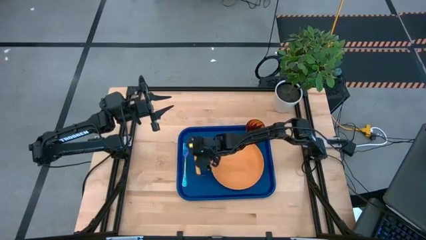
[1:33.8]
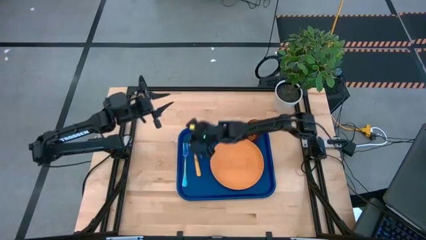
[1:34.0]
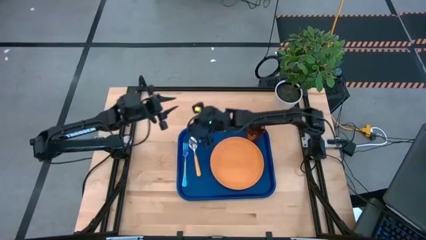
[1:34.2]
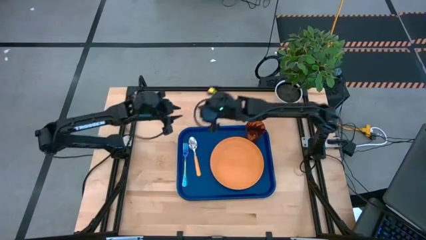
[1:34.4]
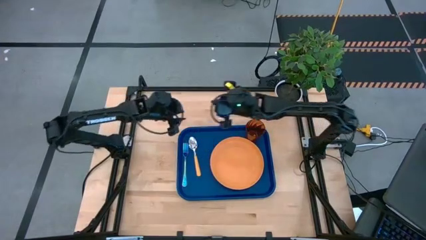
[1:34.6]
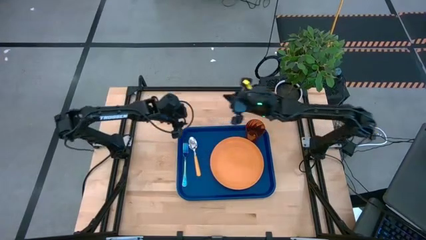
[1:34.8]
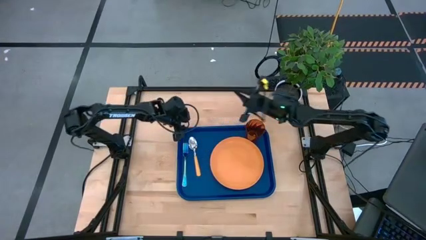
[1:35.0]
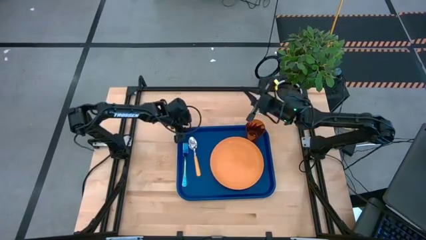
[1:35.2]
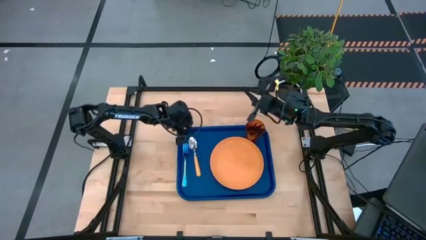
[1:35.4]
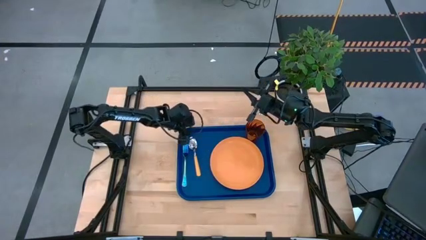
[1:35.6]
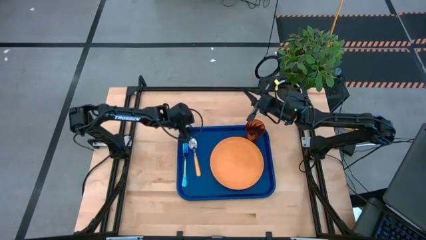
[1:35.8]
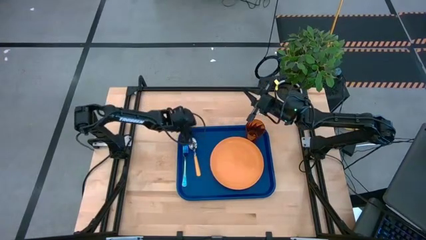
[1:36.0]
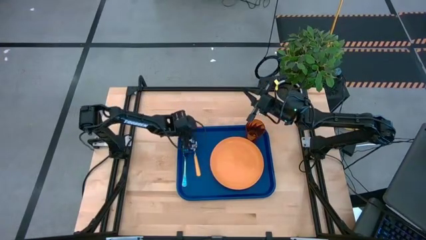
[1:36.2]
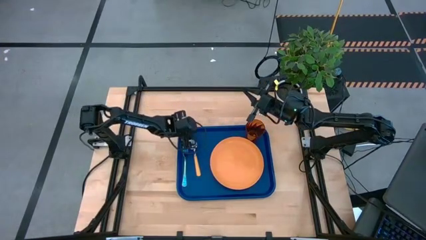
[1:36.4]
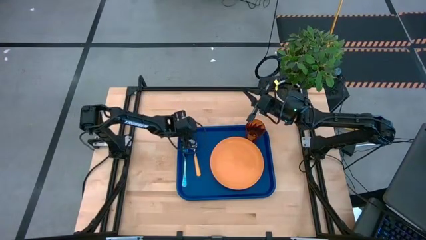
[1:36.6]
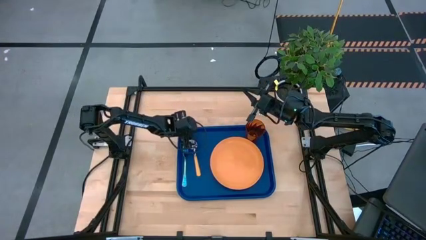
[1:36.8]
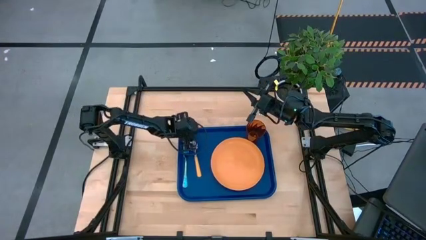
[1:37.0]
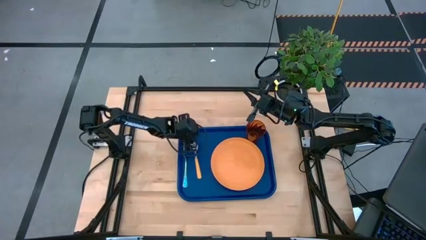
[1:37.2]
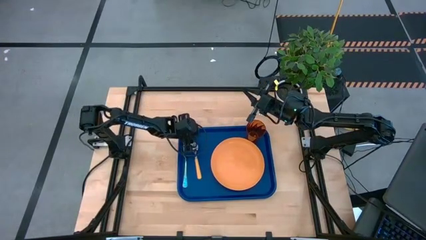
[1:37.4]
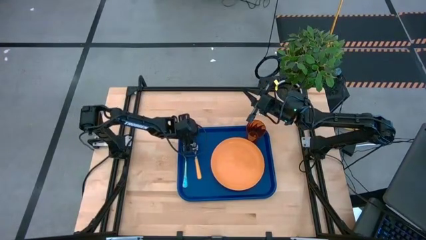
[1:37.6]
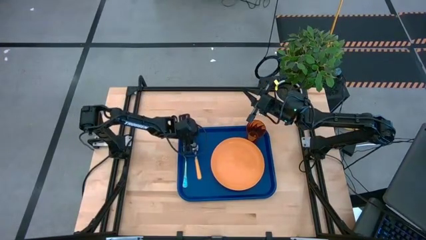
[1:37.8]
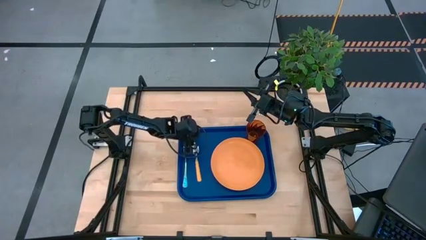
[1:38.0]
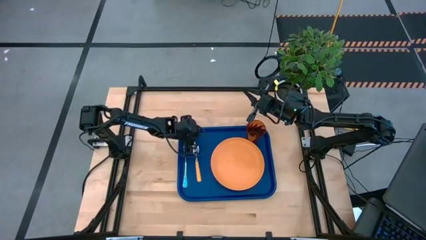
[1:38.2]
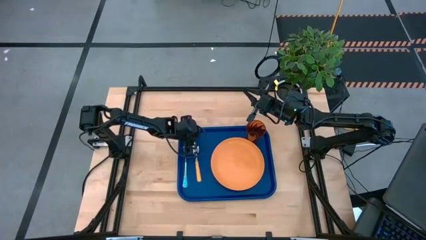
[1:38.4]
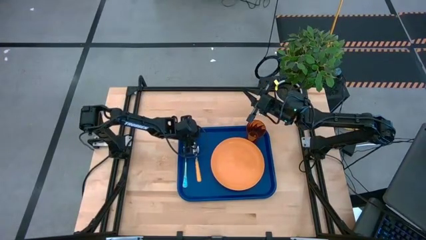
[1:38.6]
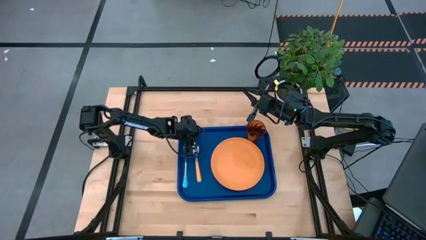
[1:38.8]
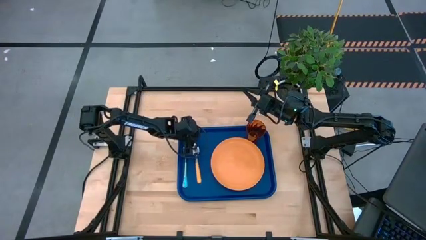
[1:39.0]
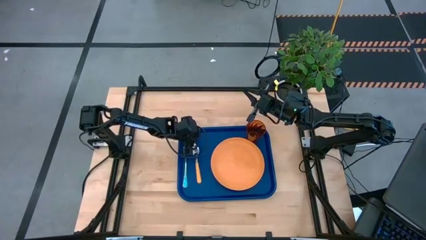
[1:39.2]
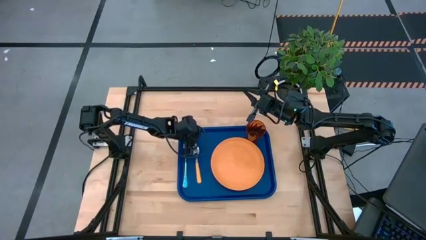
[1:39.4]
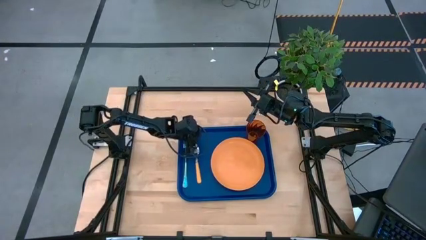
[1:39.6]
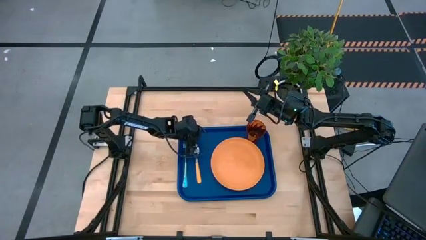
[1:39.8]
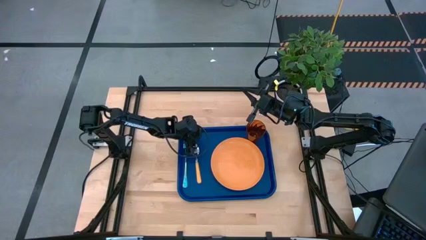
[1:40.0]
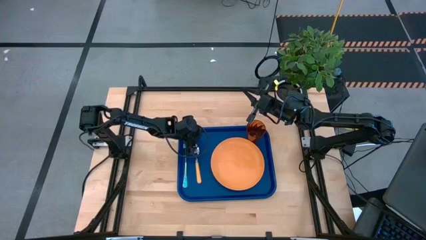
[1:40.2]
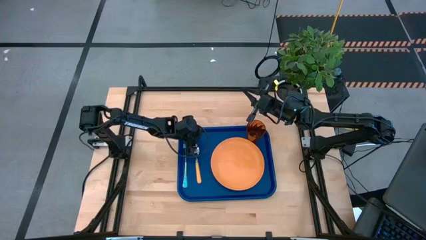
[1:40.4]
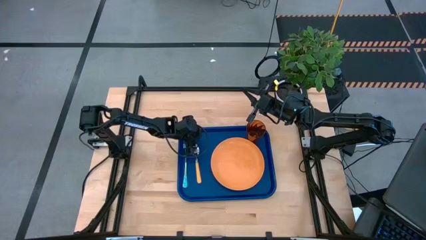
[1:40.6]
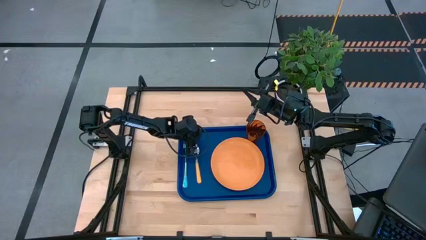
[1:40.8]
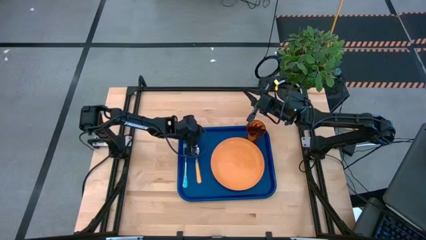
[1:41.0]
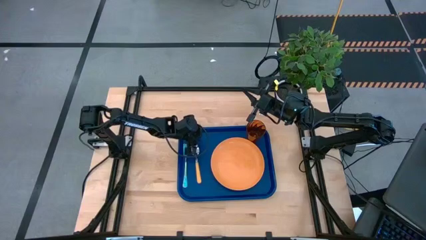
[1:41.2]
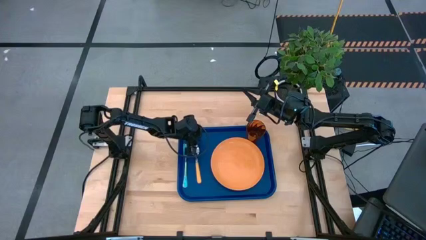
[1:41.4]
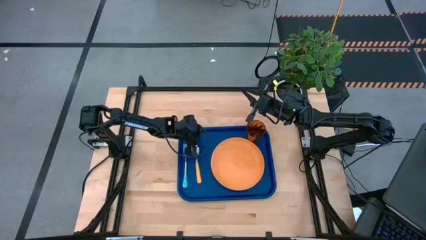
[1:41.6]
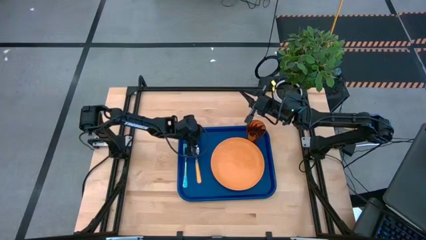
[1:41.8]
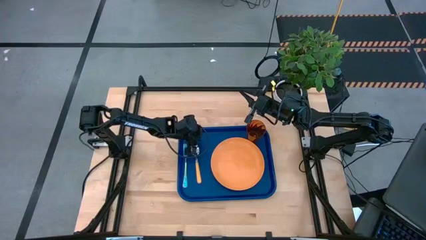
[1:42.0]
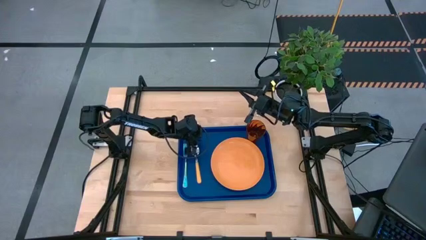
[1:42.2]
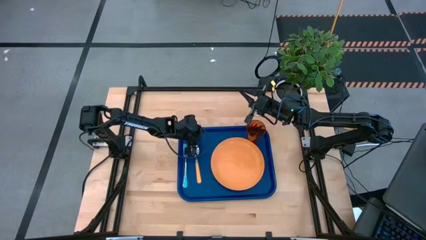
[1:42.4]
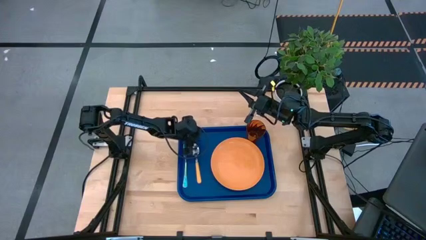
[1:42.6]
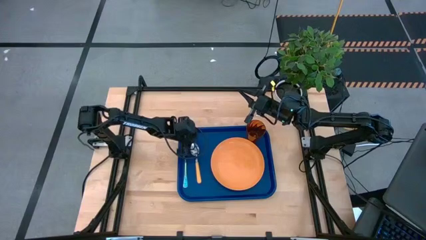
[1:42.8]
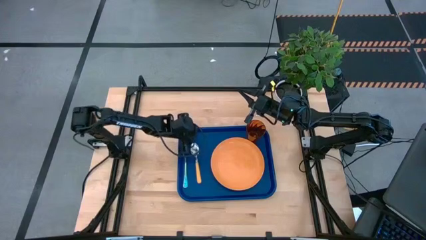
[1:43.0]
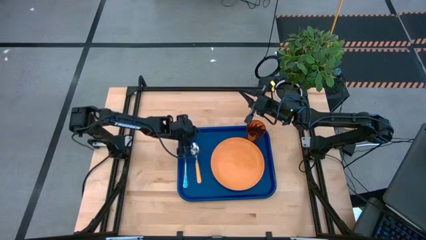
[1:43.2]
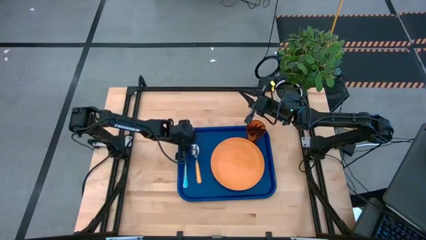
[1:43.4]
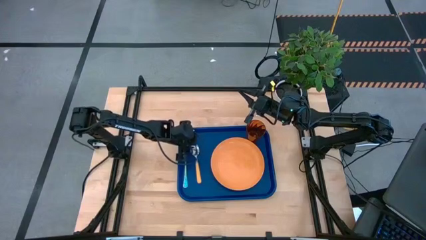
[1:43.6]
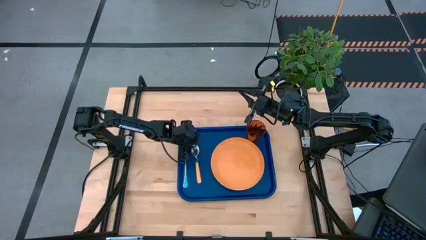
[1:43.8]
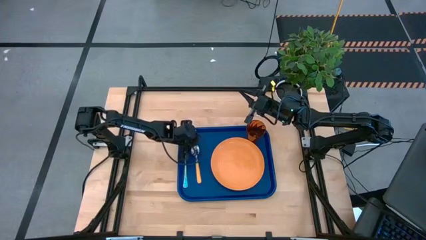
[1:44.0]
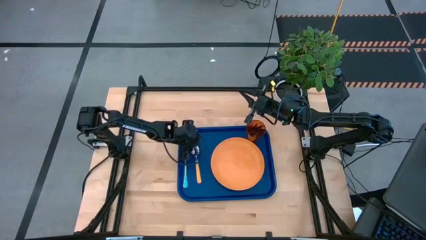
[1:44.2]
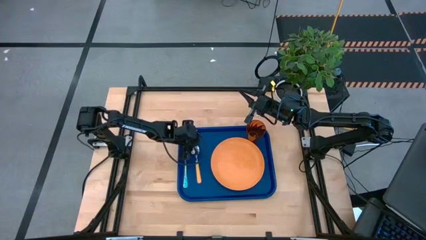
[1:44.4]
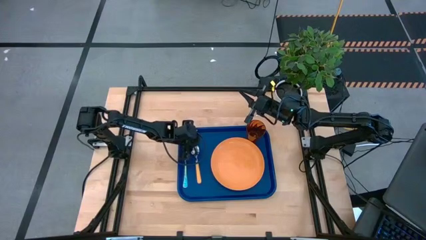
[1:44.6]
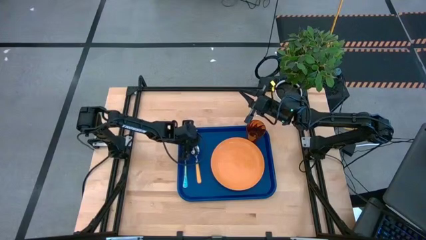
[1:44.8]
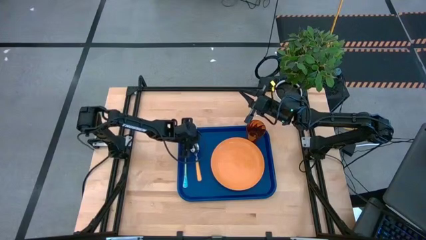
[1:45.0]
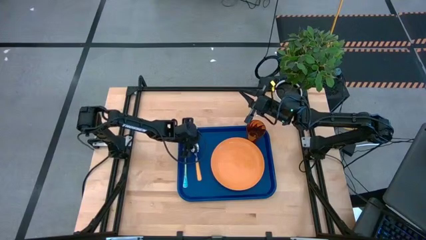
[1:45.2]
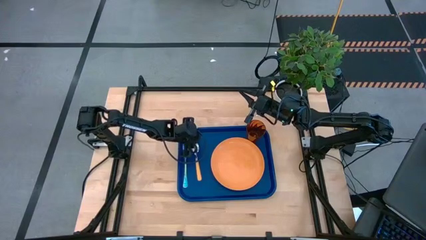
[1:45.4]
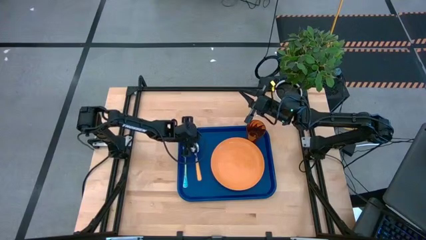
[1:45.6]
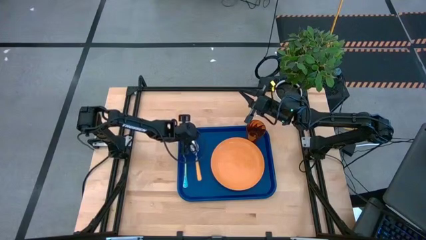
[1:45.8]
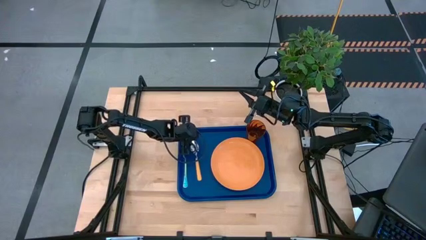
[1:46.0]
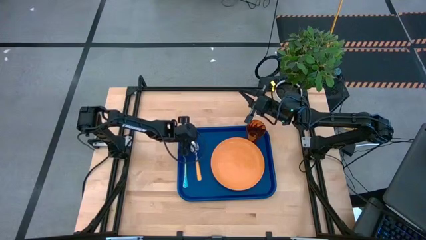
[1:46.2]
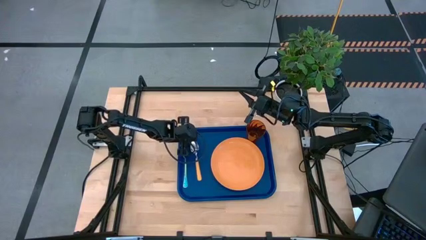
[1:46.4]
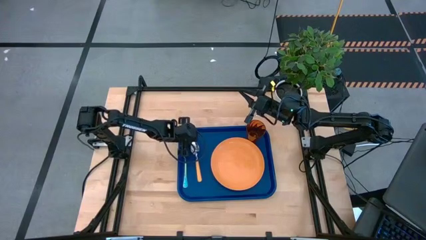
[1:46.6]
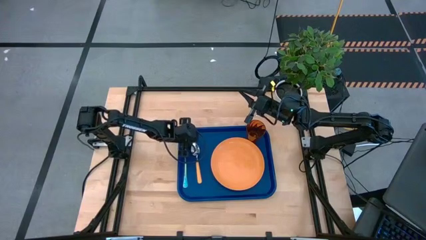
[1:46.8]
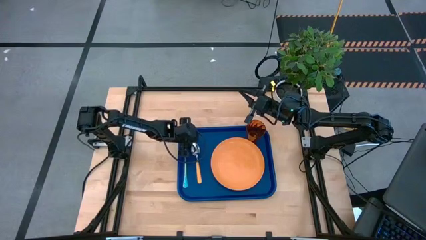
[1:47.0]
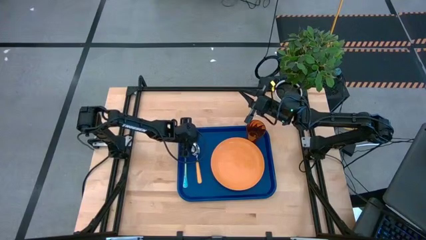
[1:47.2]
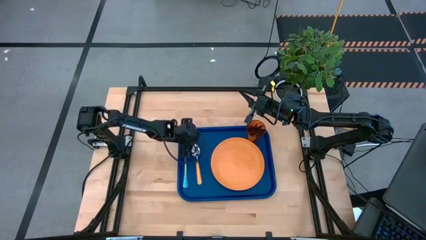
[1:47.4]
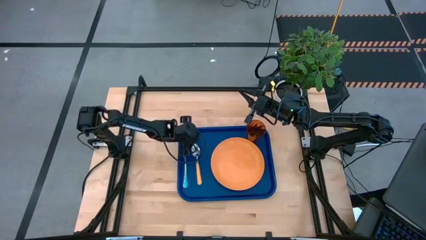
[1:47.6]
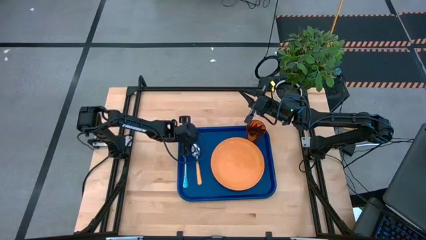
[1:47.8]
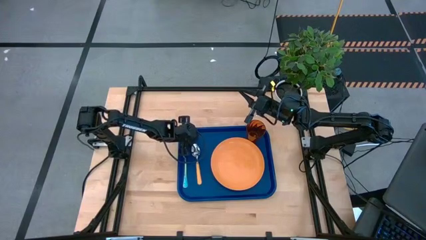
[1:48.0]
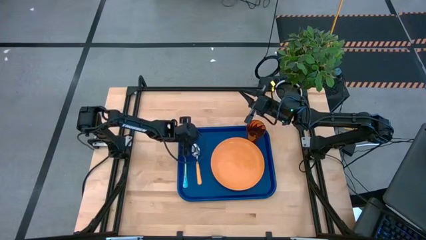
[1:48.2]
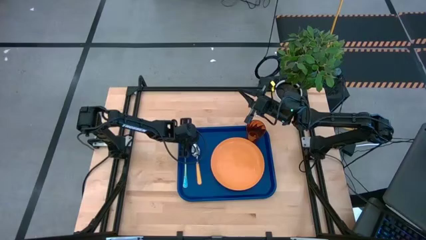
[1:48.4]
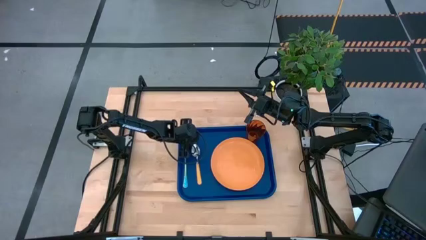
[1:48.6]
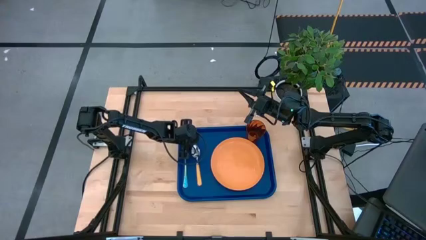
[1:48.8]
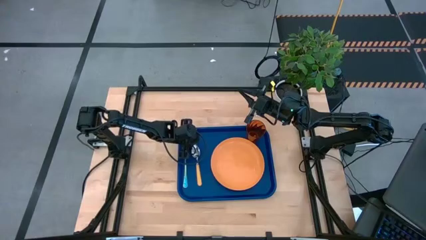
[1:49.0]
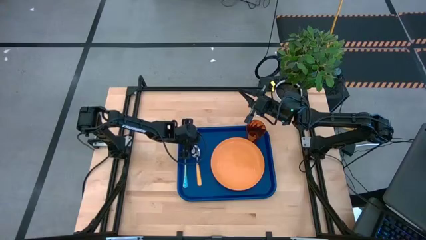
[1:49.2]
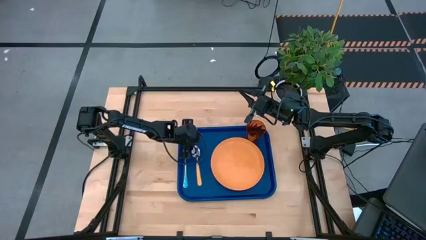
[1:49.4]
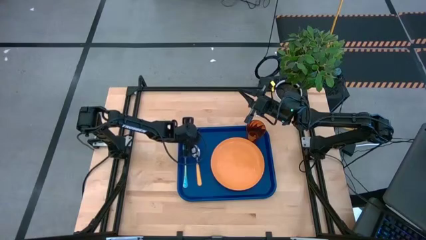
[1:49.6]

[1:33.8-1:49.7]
Task: Pick and place plate/cup/fork/spoon on tray
Adjust the orange spoon on the blue tray

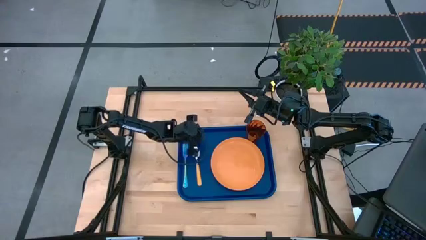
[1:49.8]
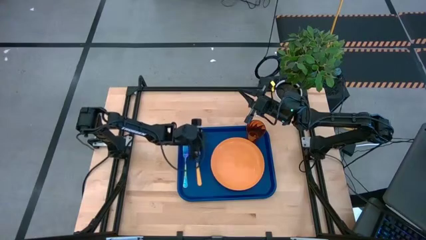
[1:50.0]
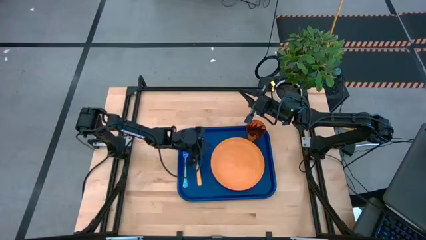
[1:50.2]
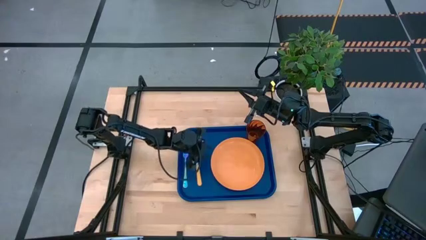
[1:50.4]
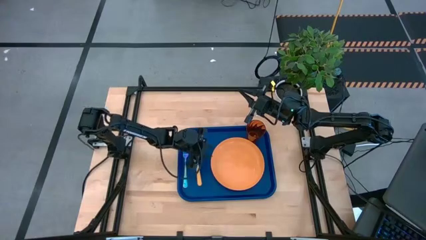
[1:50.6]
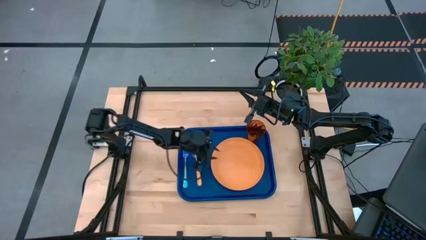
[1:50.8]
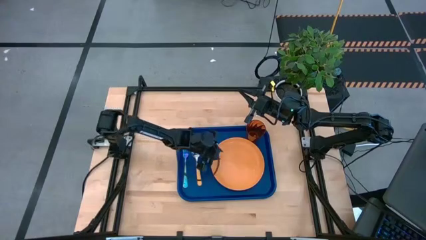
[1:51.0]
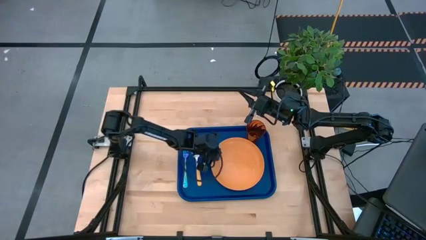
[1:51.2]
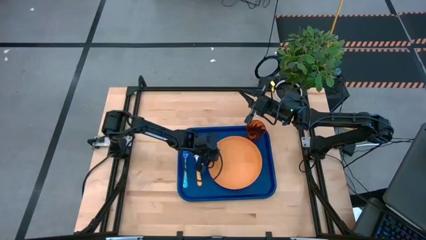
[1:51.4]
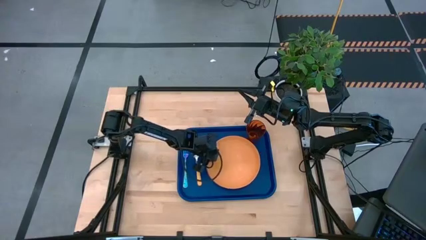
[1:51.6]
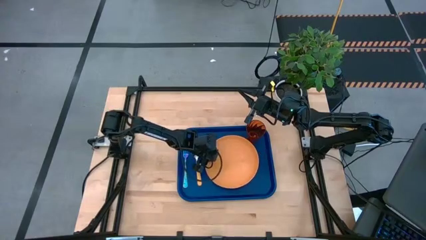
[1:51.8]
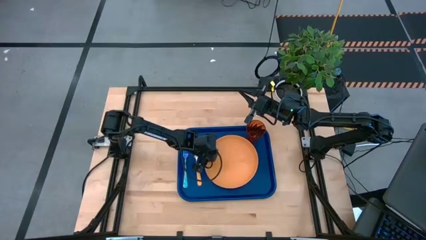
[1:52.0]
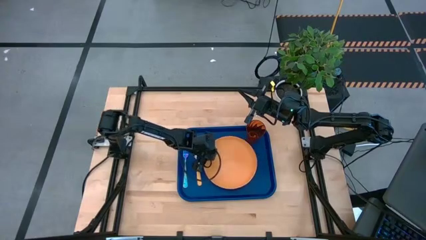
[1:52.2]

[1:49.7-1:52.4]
Adjust the orange plate on the blue tray
